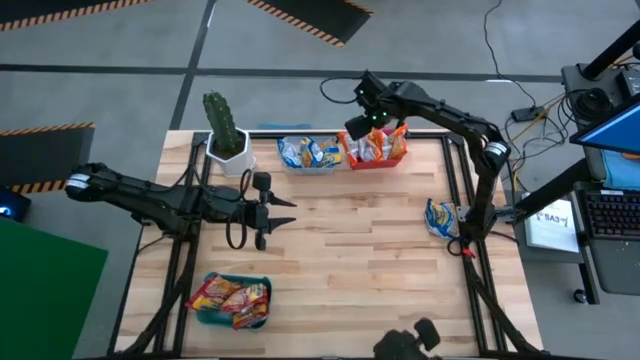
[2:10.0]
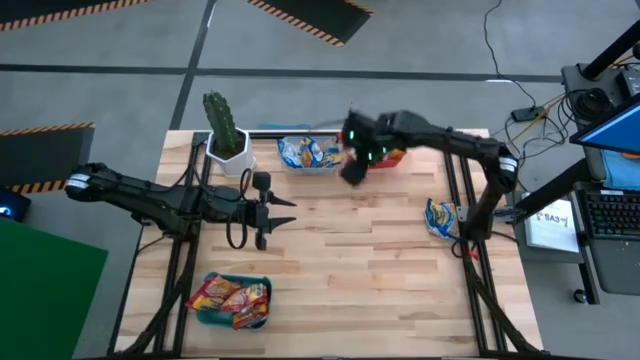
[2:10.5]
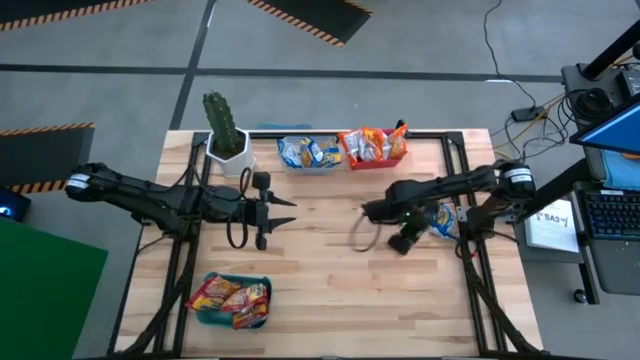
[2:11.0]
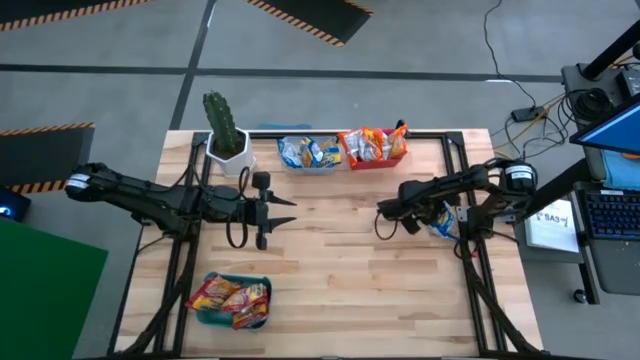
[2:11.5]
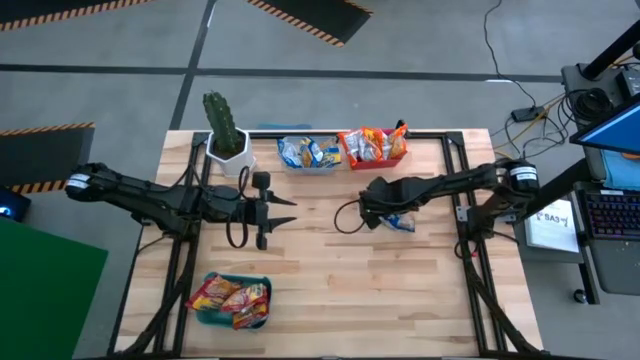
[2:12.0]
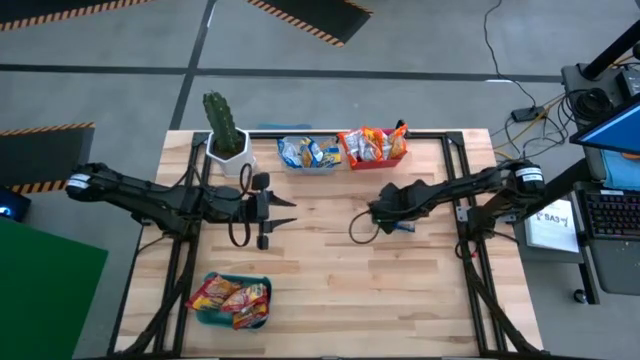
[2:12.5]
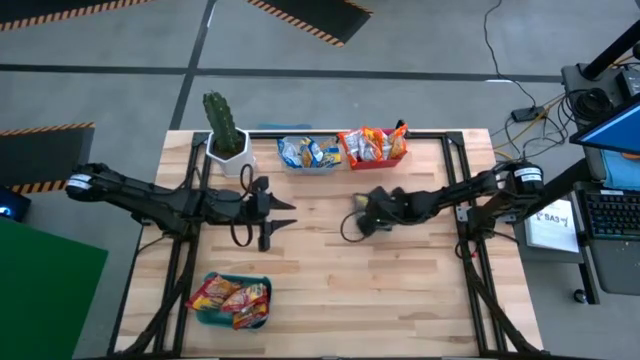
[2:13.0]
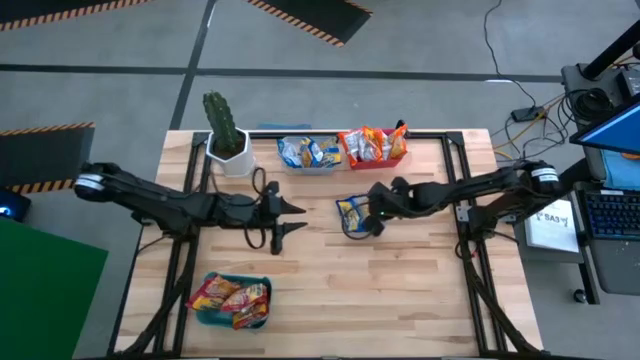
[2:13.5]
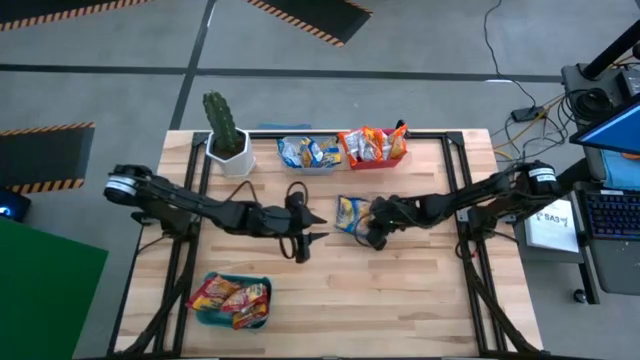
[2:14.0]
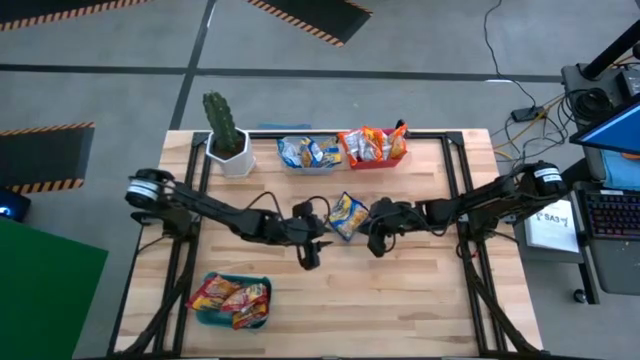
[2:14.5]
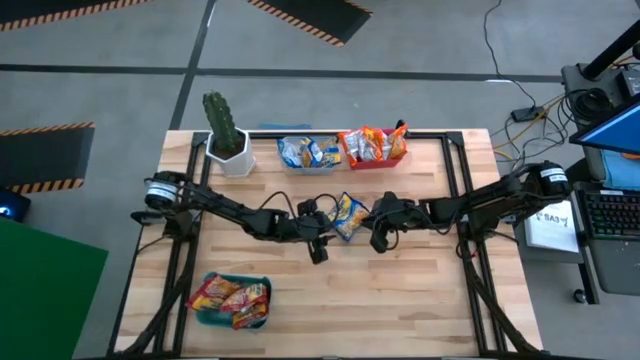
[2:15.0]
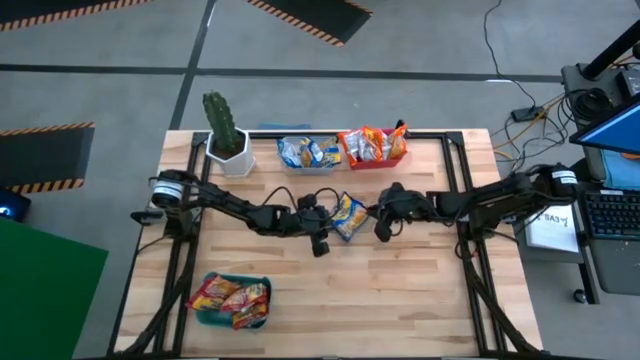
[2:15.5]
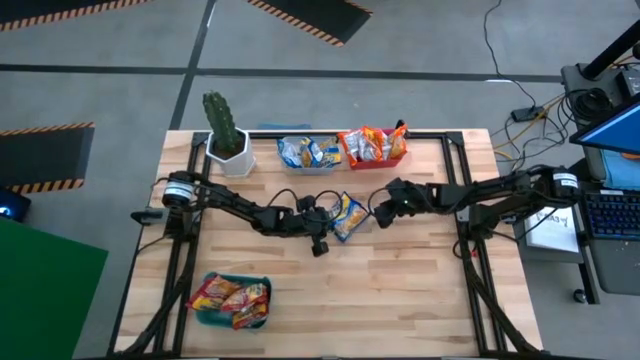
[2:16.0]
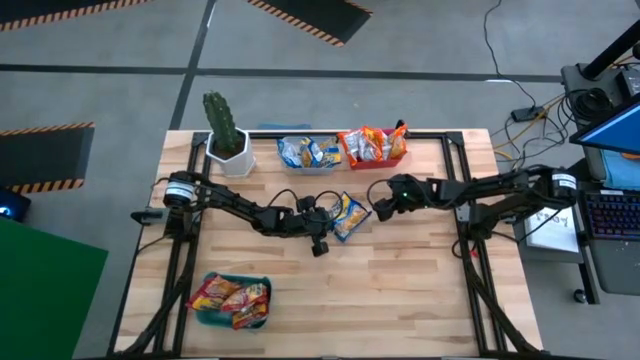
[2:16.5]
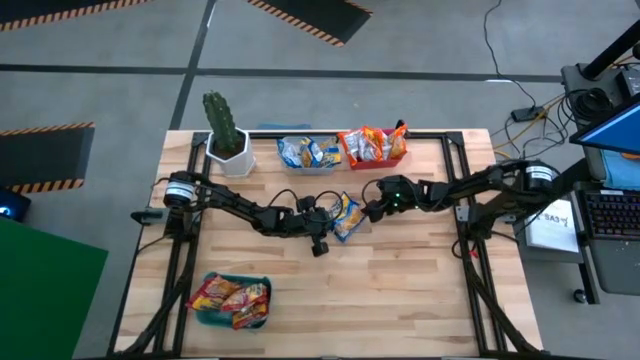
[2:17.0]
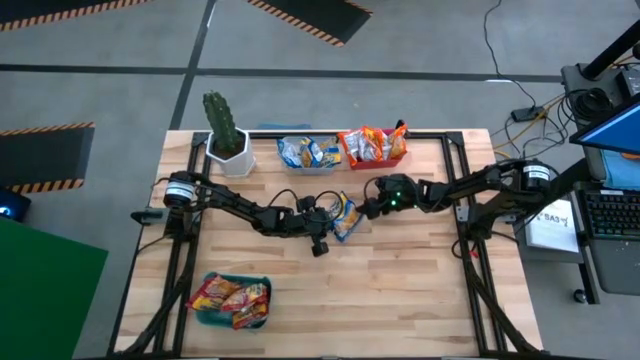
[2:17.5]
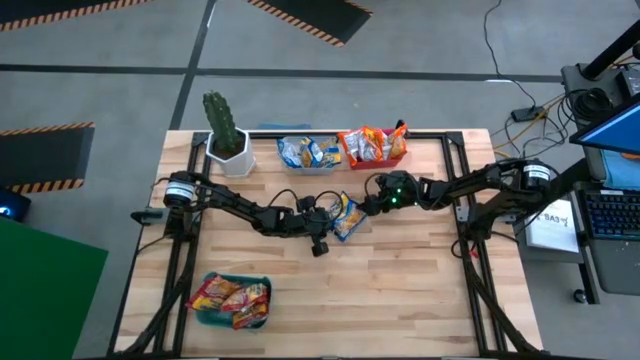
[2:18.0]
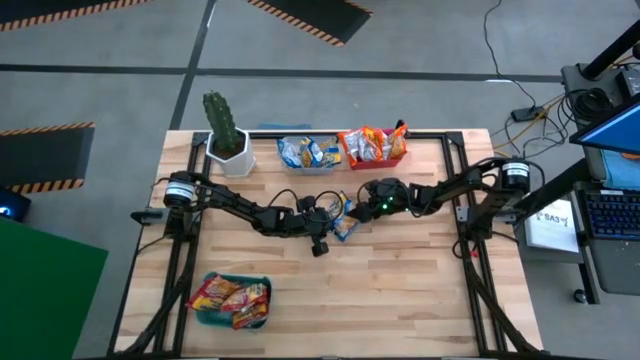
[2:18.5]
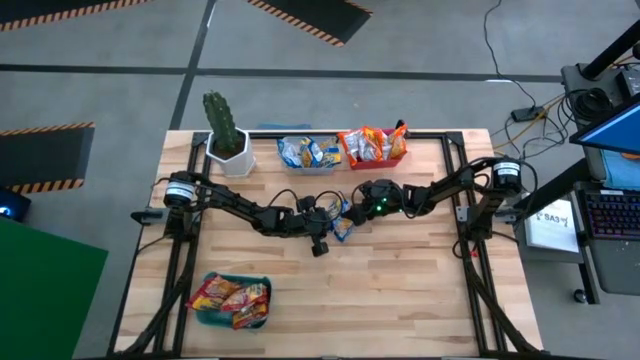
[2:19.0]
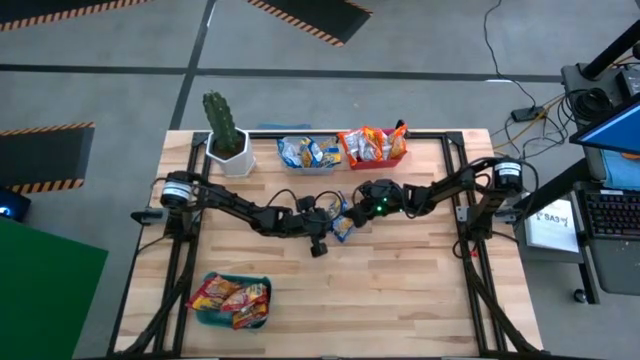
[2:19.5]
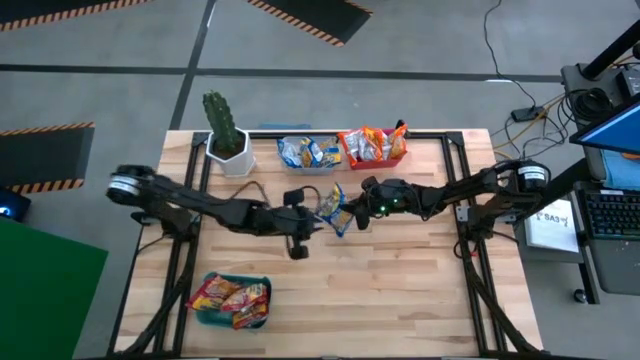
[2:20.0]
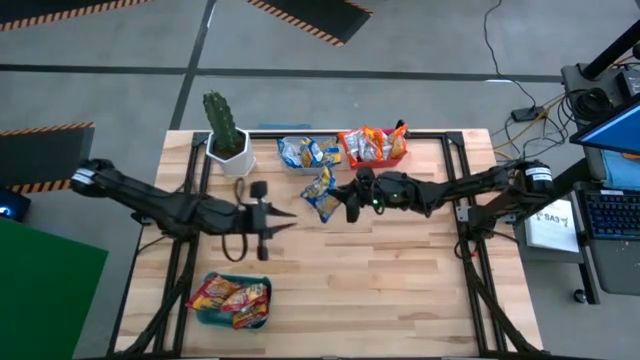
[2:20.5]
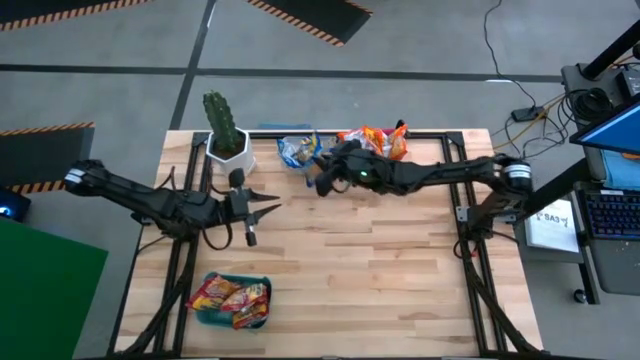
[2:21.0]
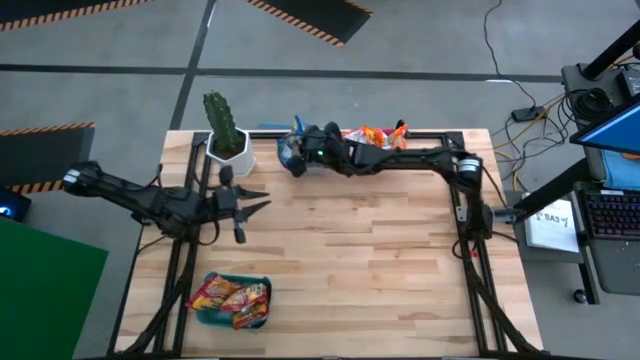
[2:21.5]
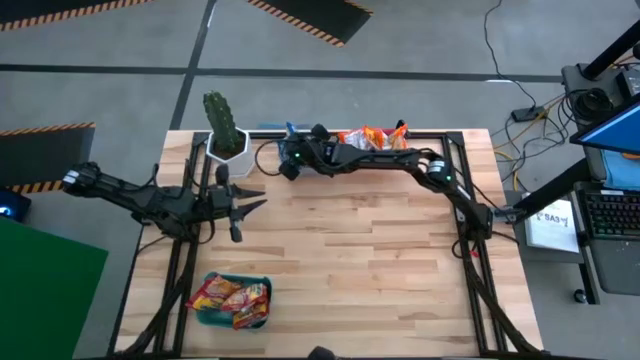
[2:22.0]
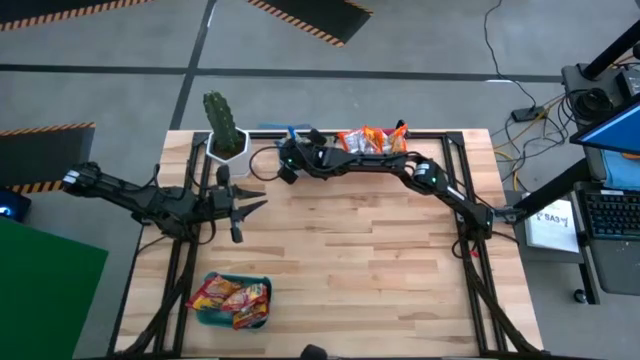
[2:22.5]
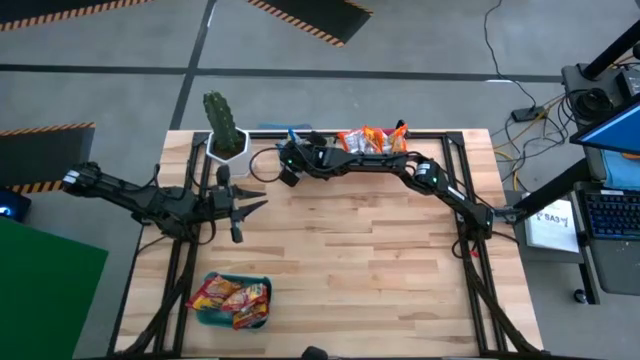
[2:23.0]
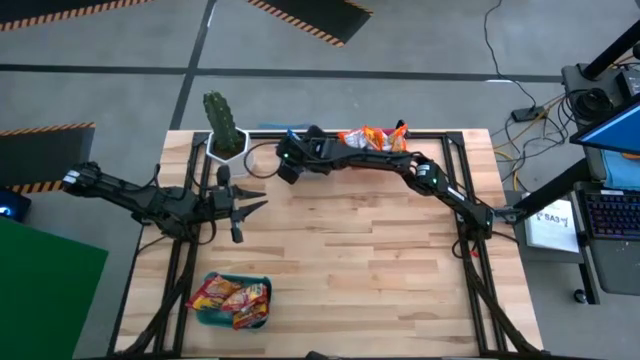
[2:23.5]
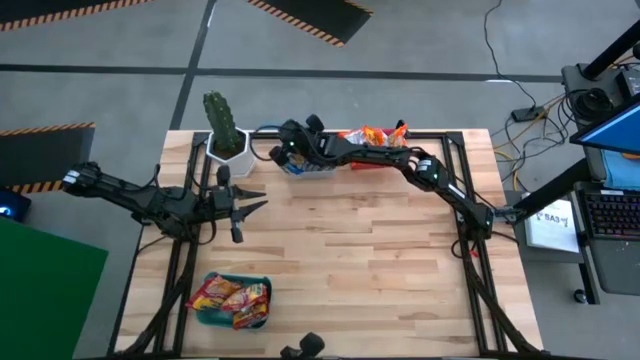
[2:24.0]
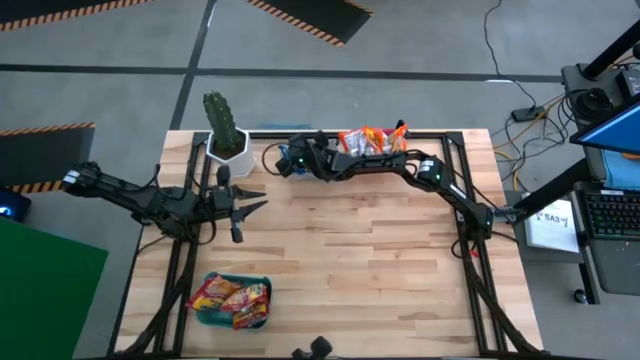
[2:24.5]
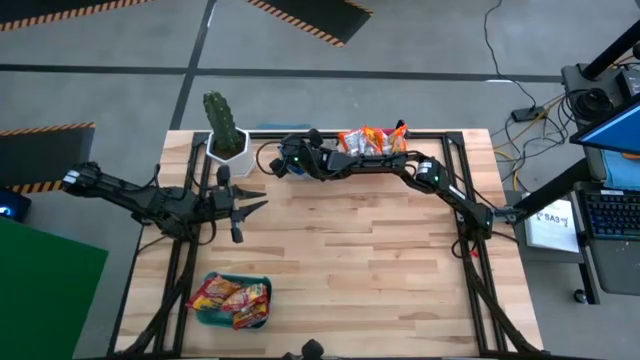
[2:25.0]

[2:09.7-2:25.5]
Task: Sort Maruchan noodles
Put the blue noodle pack into the white bin

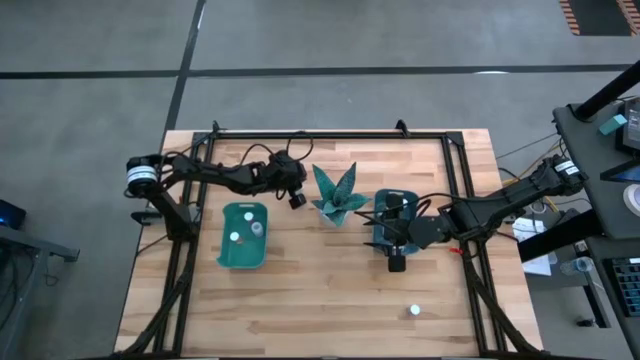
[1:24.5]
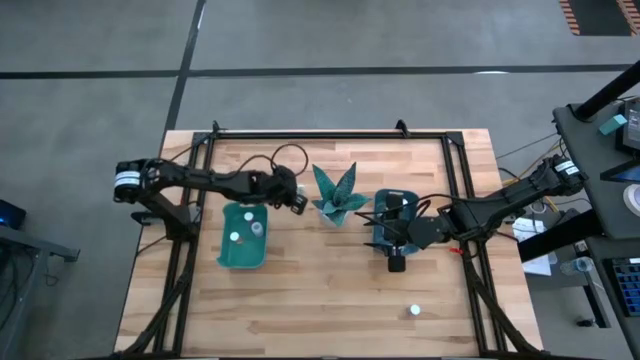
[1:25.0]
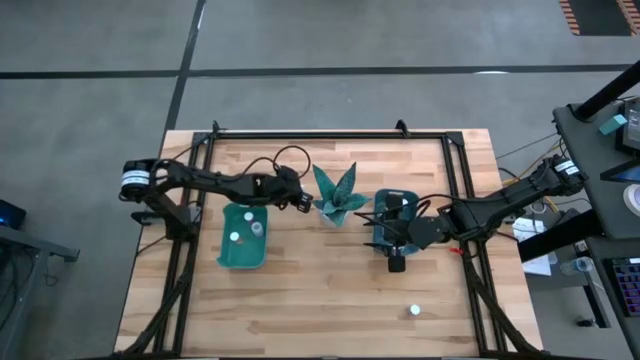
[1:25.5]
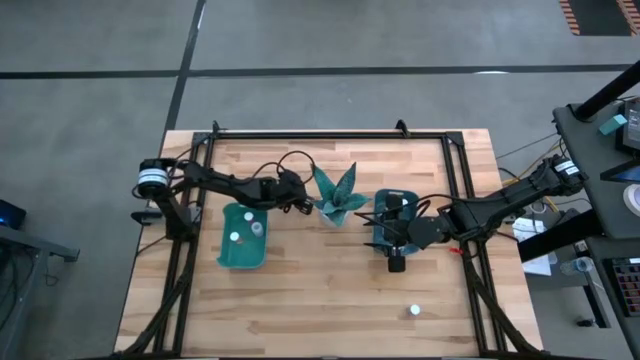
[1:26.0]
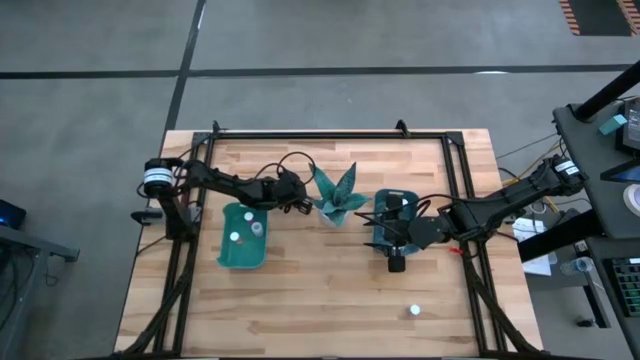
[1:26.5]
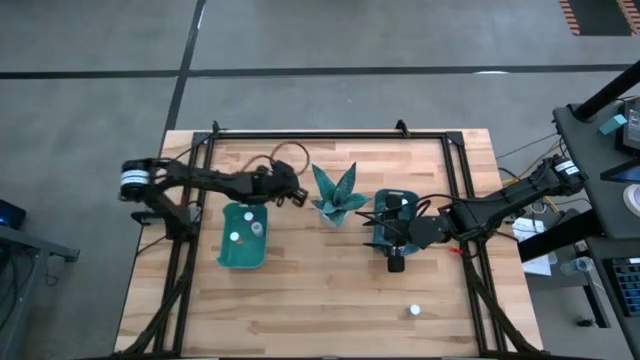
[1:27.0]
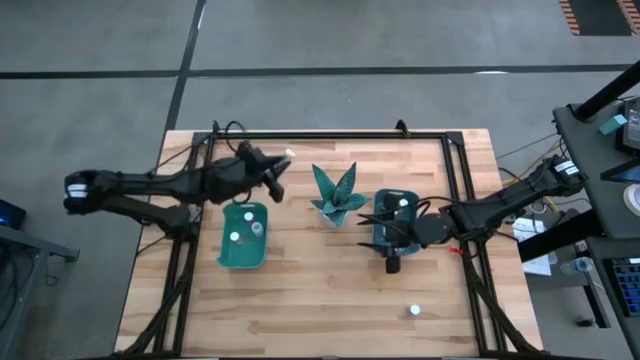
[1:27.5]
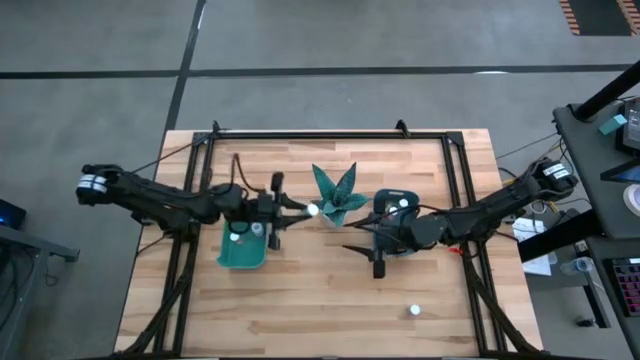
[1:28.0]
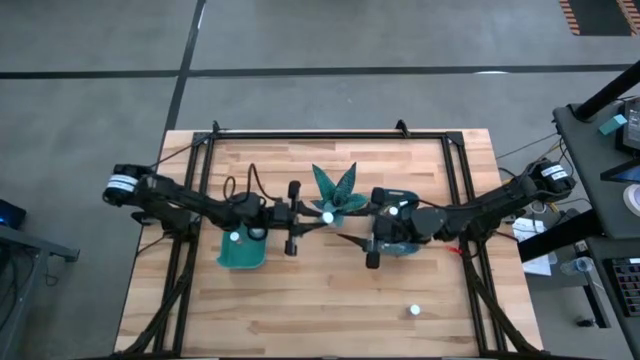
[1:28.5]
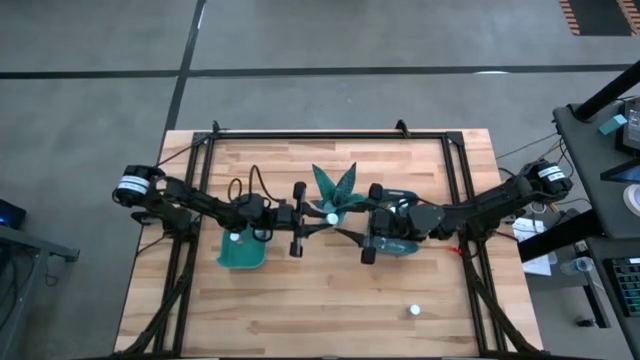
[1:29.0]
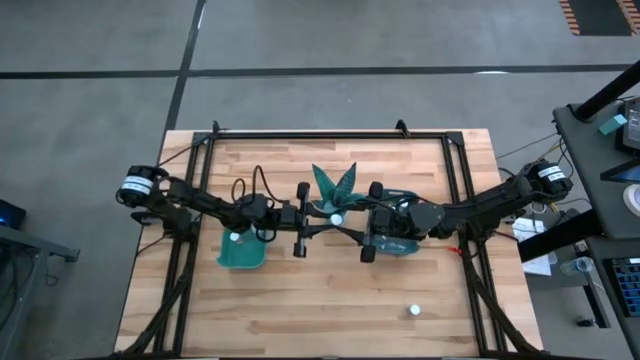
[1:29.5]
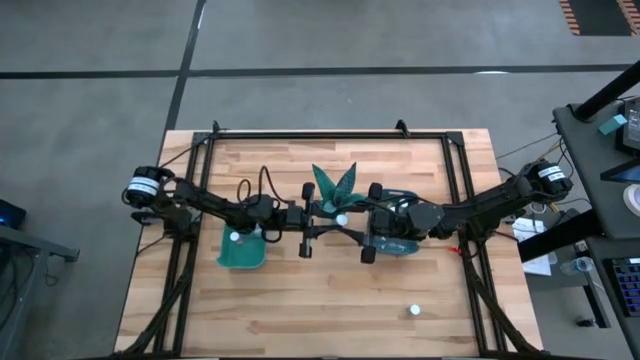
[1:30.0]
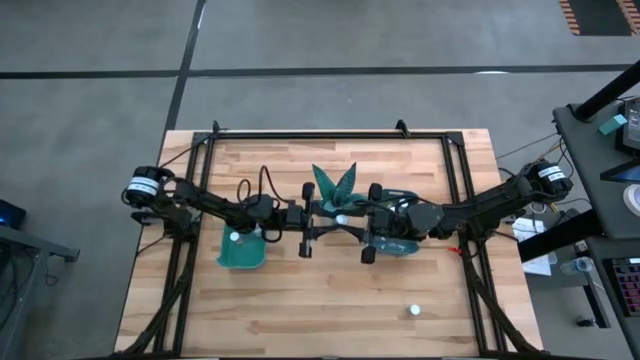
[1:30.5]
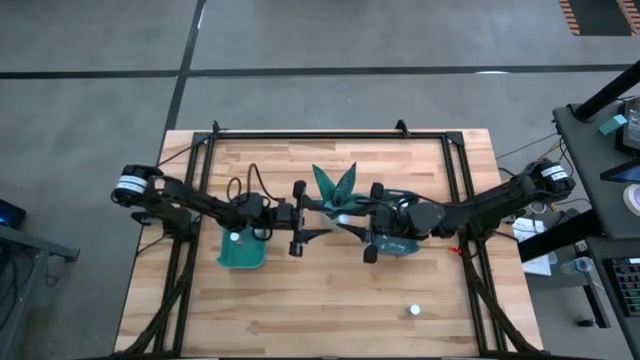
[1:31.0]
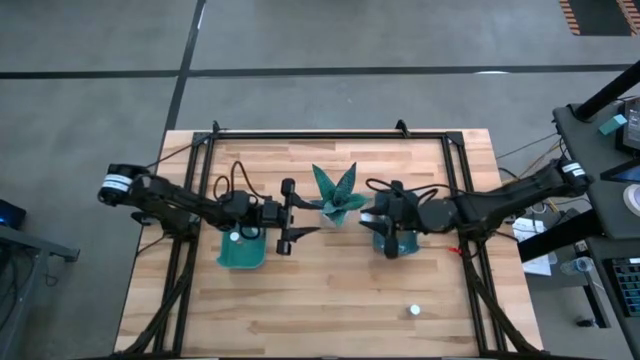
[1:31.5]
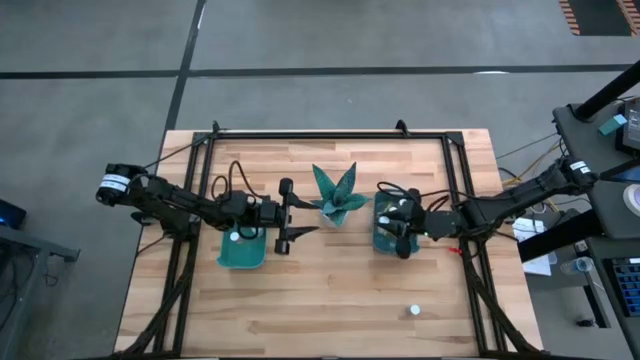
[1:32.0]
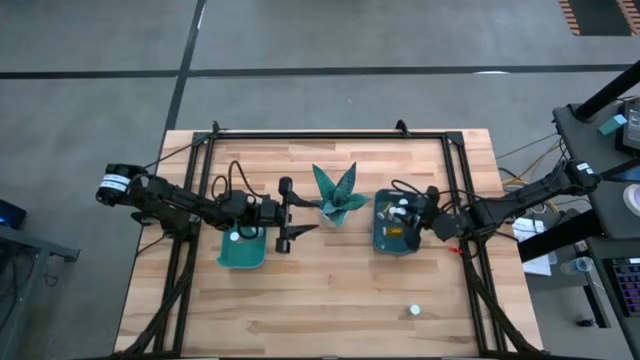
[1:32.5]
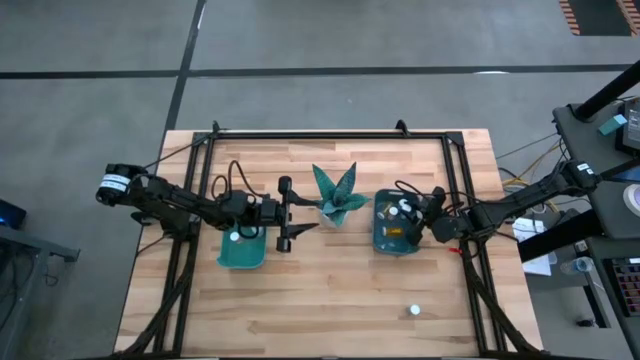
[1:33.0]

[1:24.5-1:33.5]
Task: Pick and place medicine bottles into bin by pill shape (circle, oval)
Put the blue tablet bottle into the blue bin
